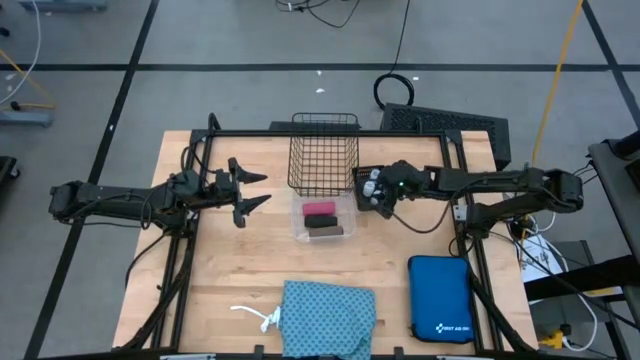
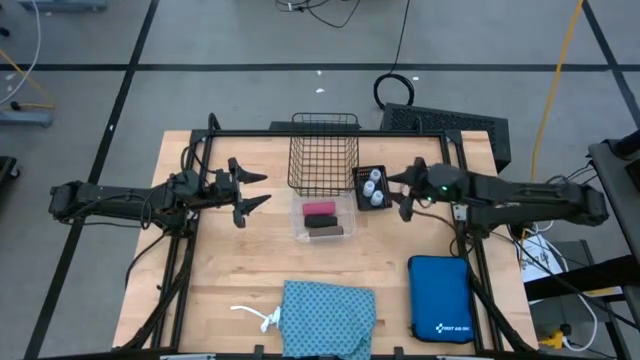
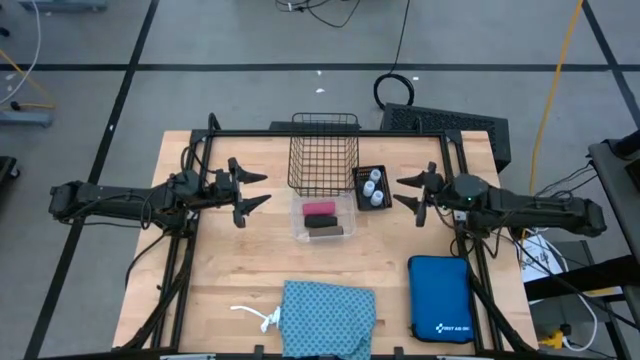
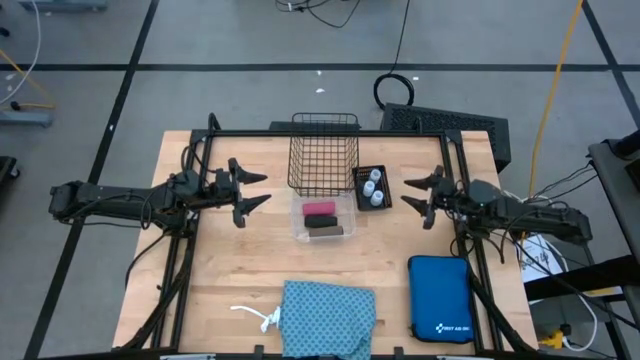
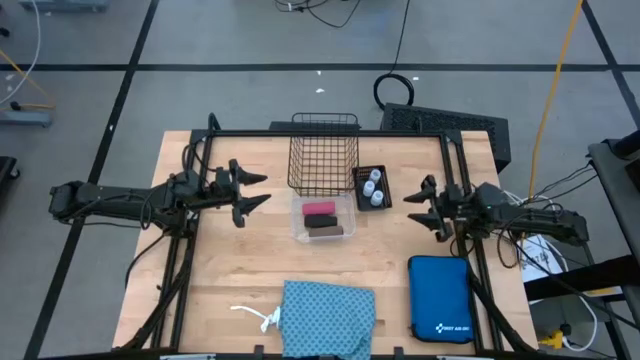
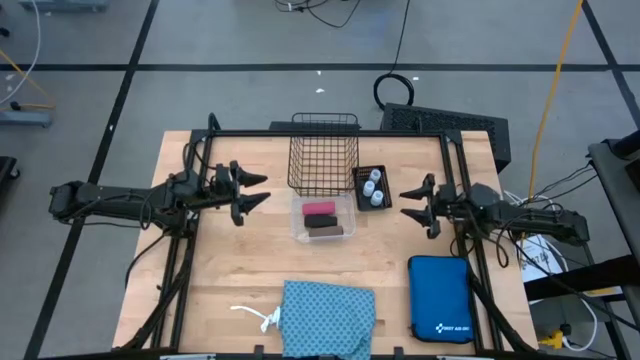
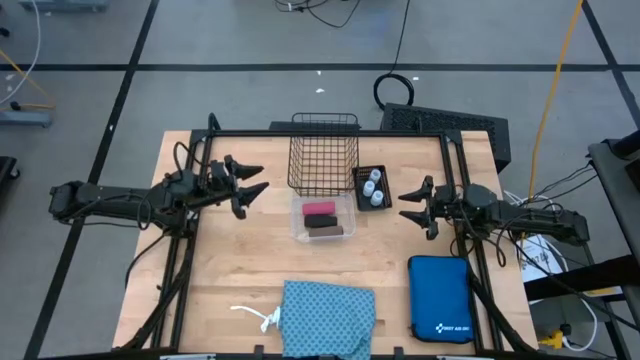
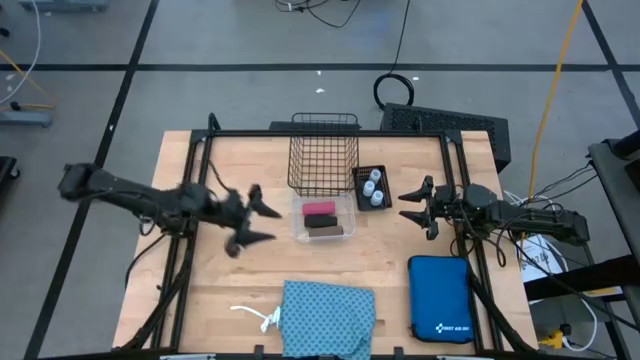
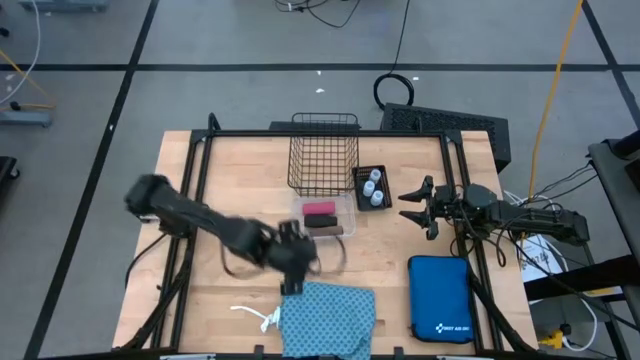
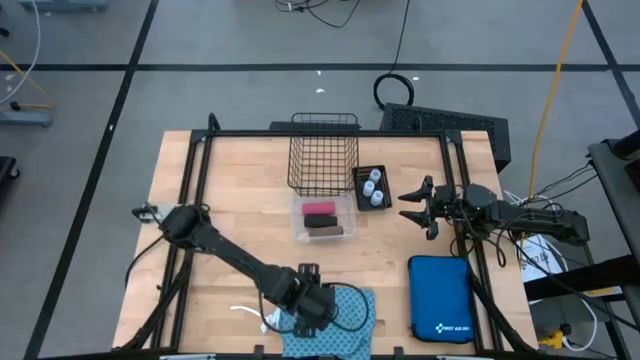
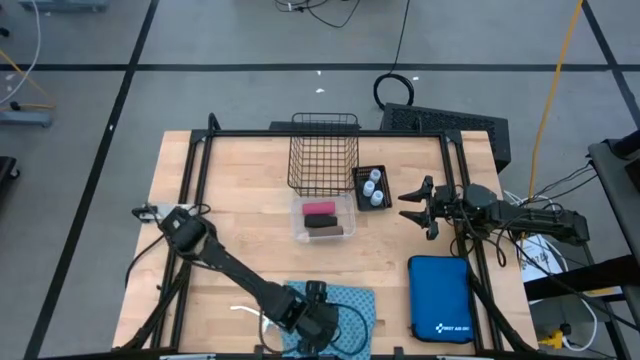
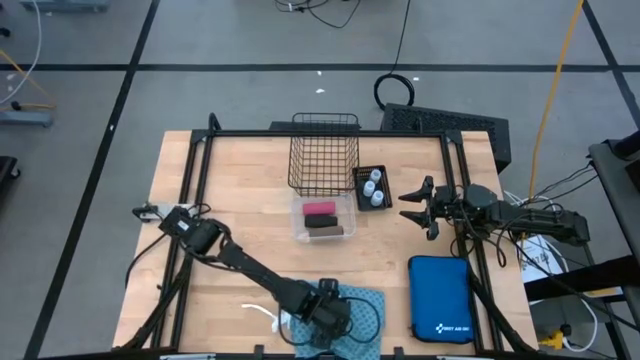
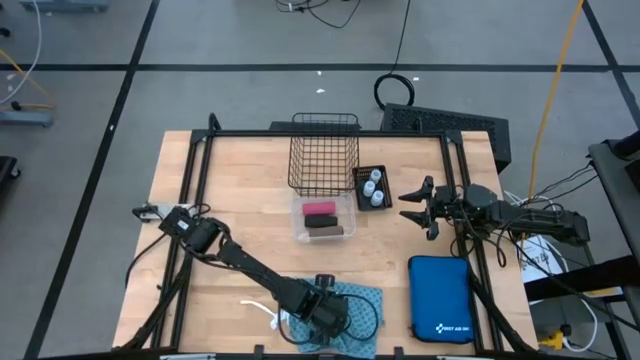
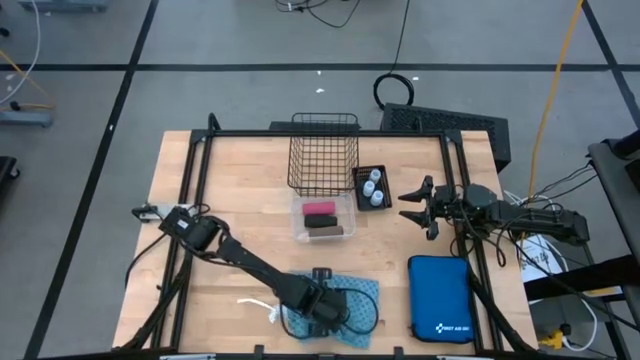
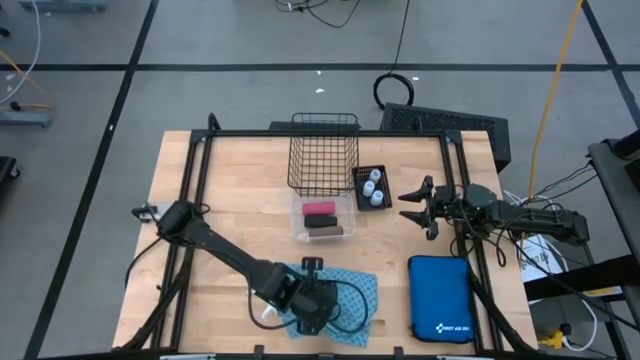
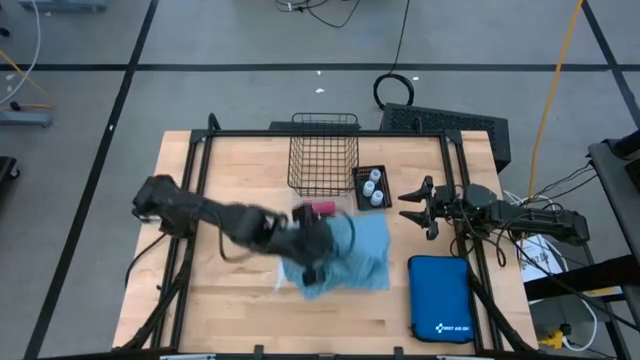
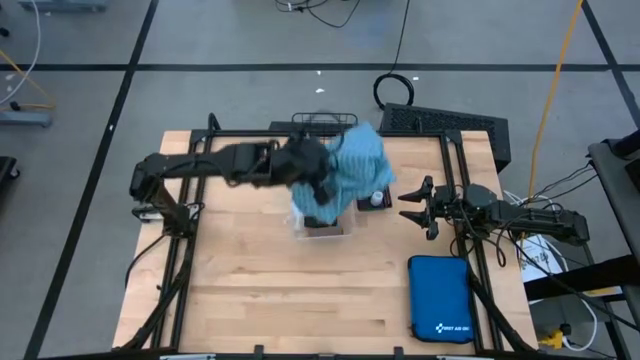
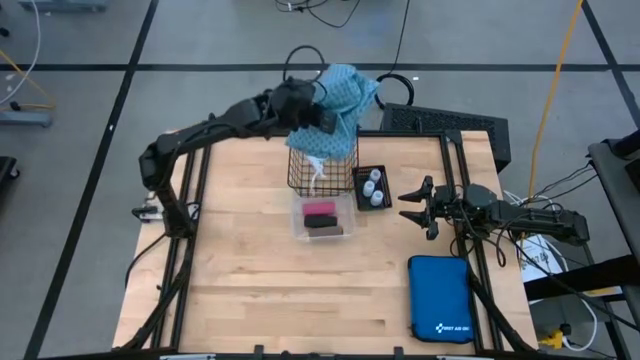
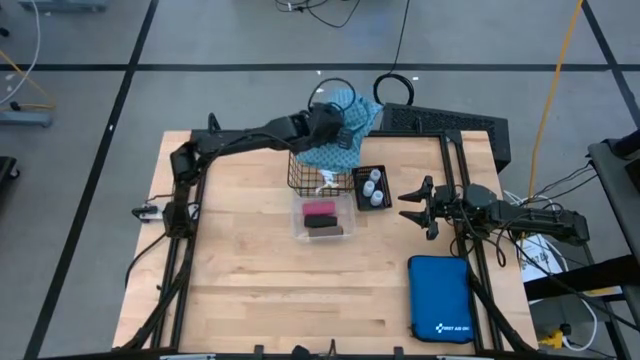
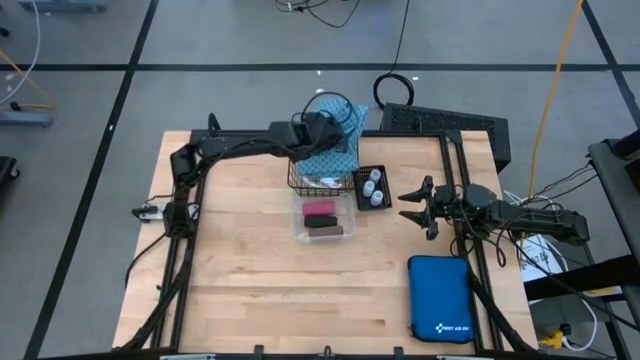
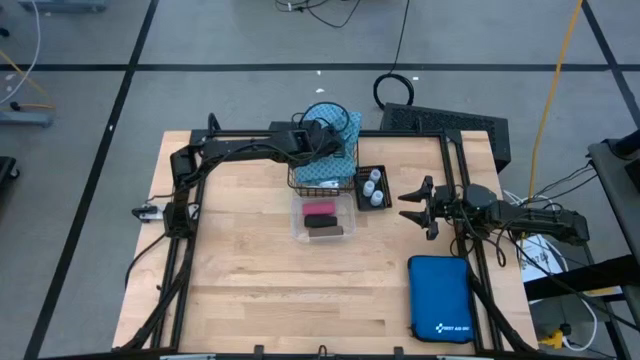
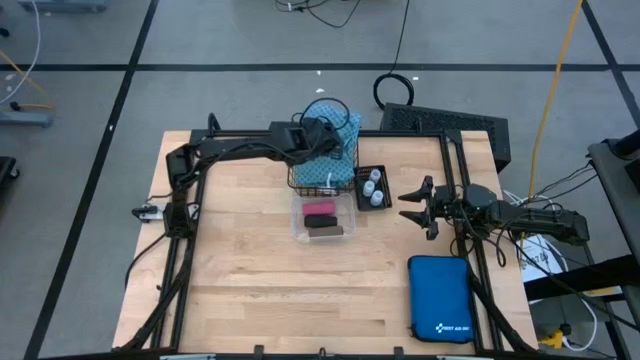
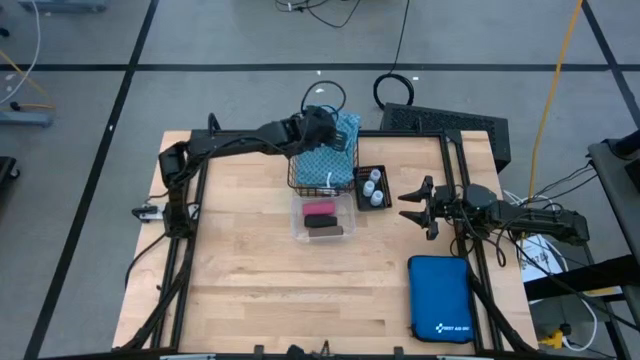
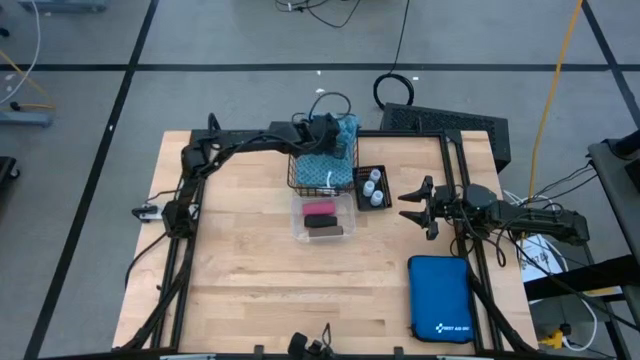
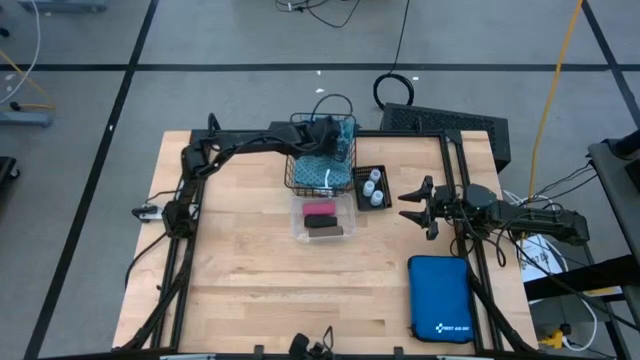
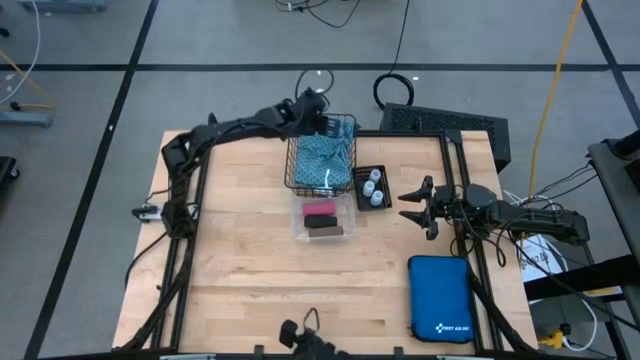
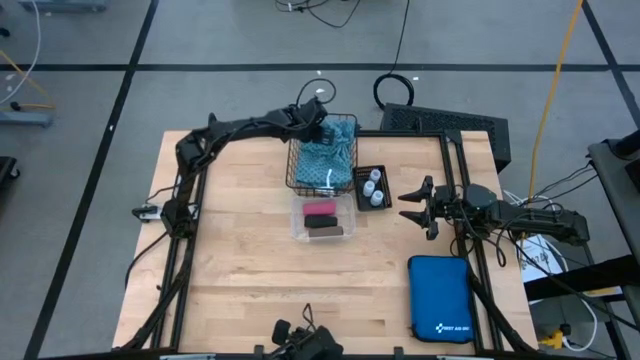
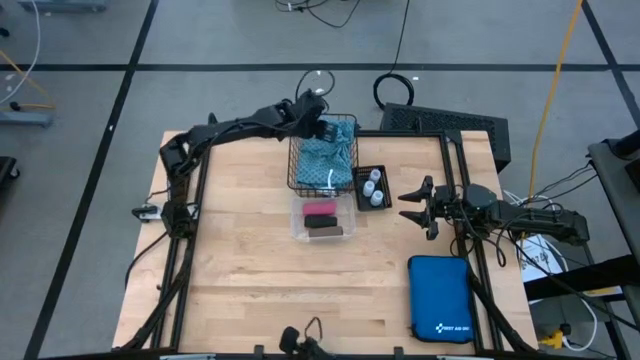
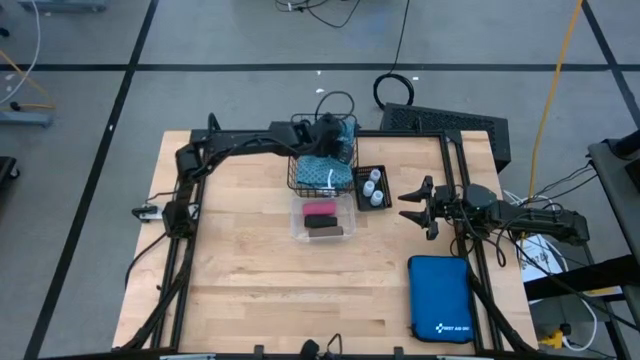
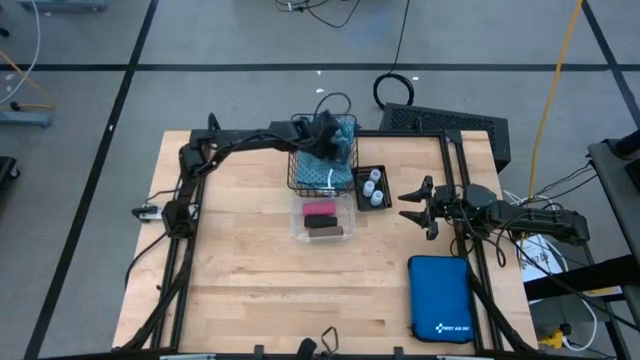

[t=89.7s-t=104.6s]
Task: Pick & Place Medicine items
Put the blue patient gown into the wire basket

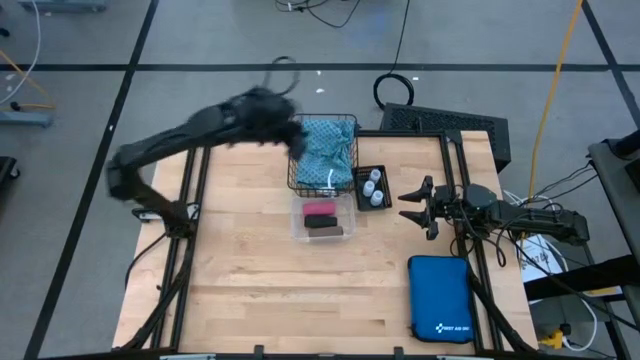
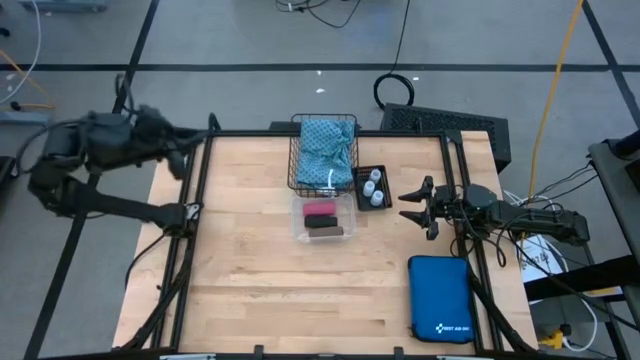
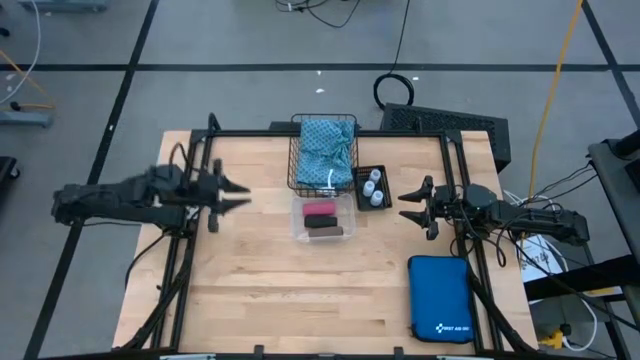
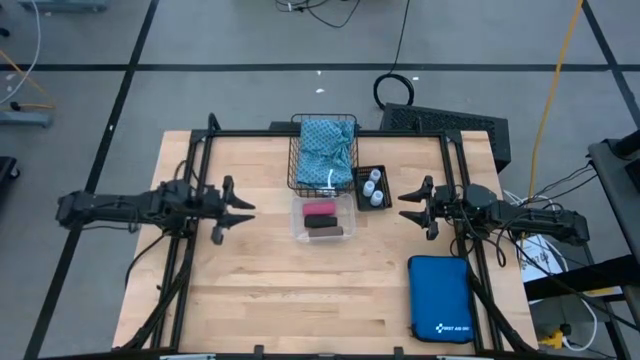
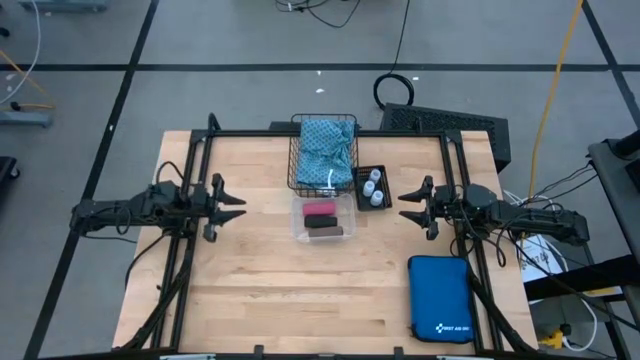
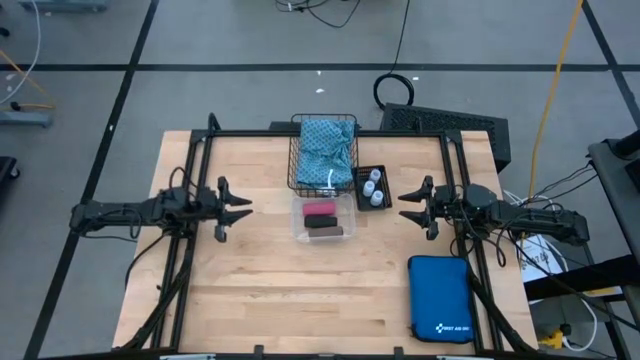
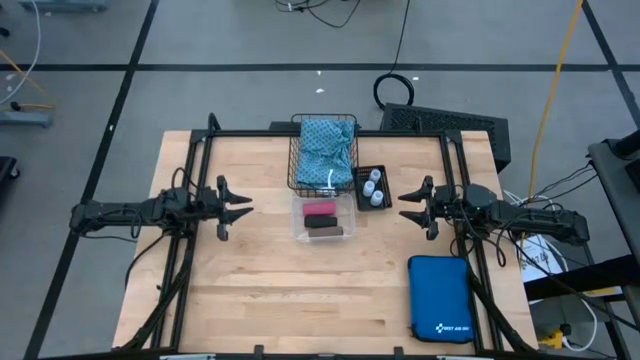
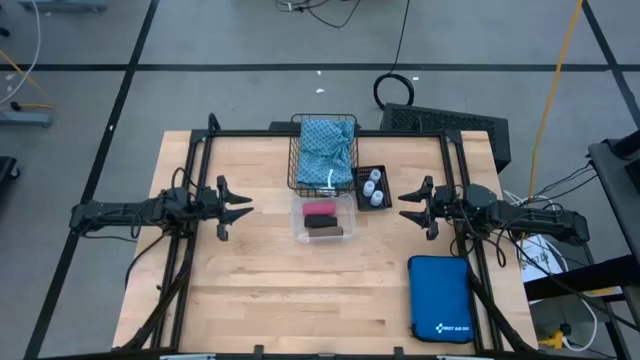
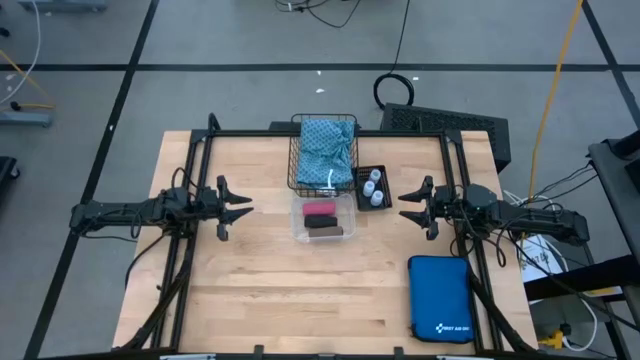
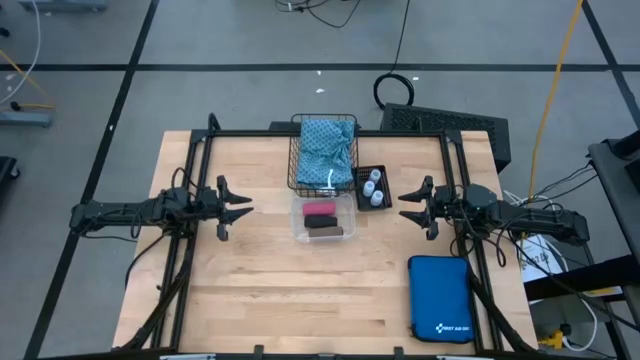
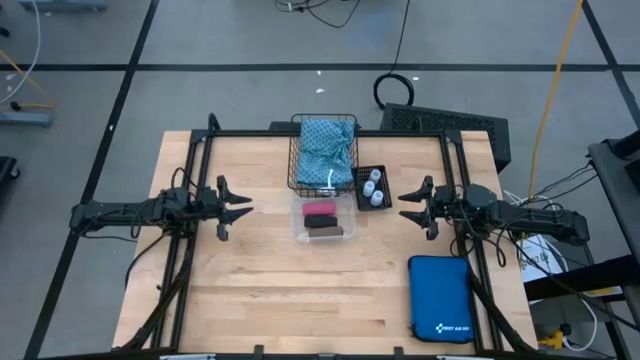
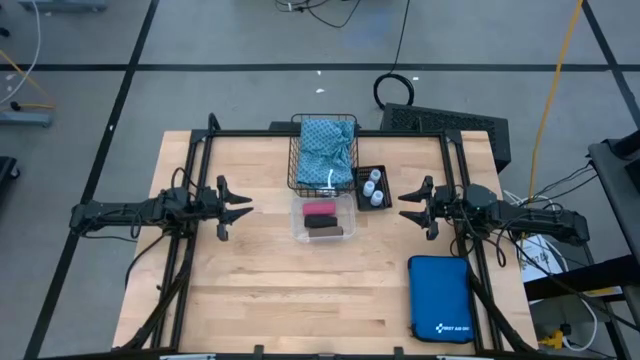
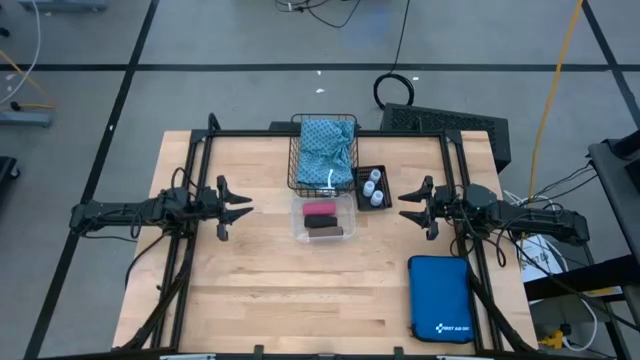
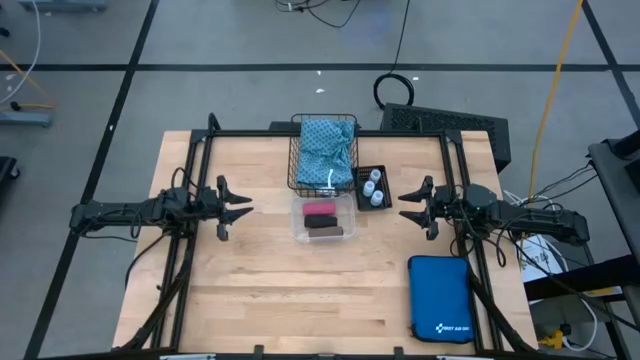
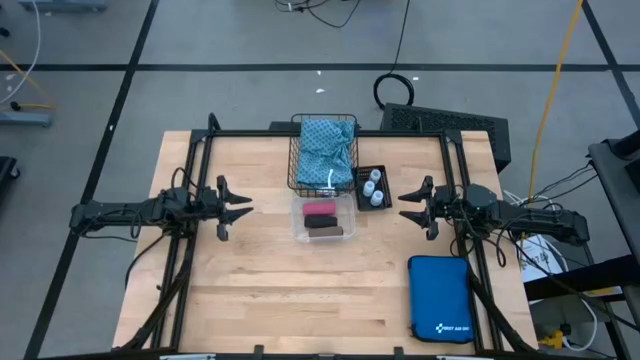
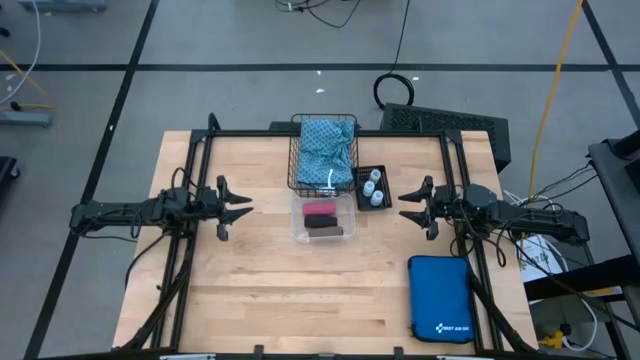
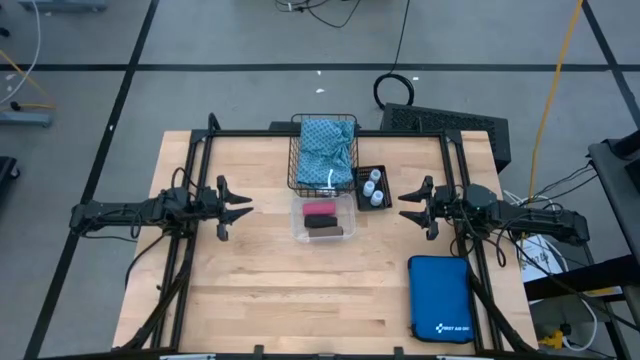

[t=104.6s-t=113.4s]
Return to Home Position
